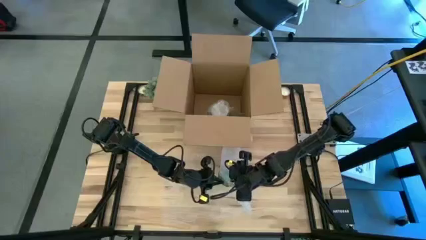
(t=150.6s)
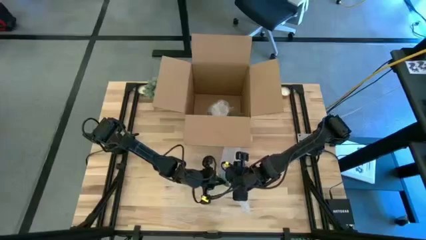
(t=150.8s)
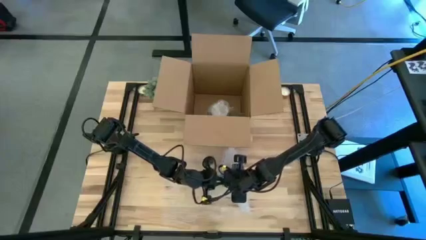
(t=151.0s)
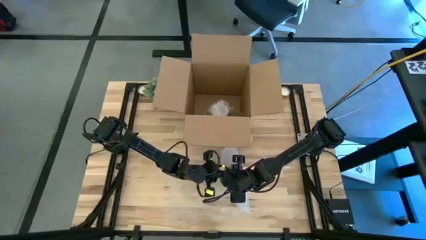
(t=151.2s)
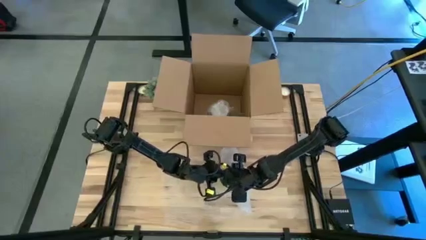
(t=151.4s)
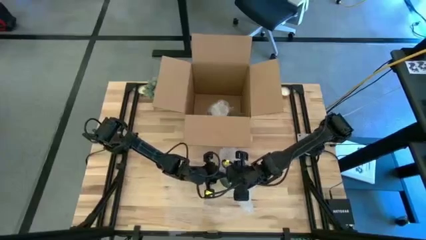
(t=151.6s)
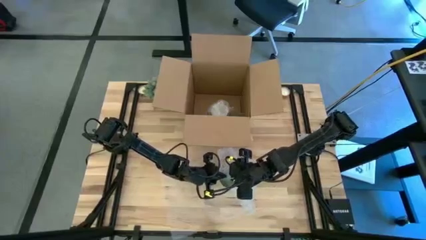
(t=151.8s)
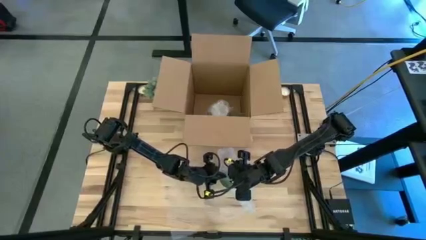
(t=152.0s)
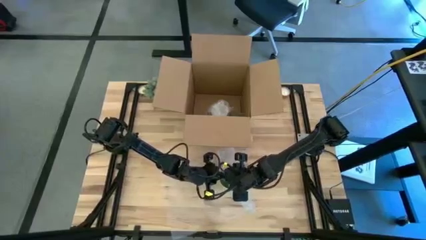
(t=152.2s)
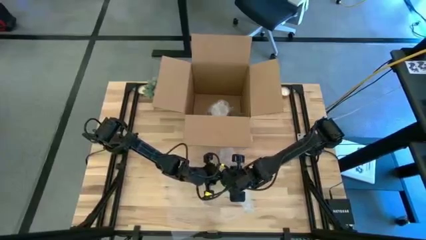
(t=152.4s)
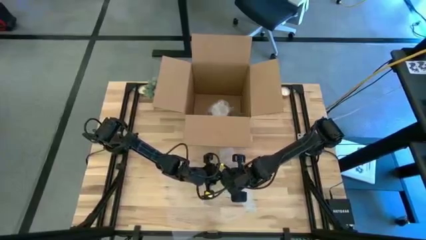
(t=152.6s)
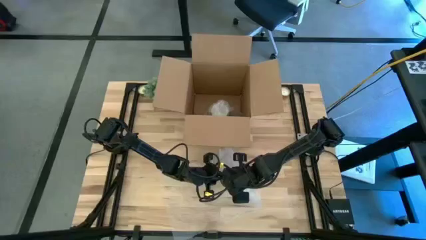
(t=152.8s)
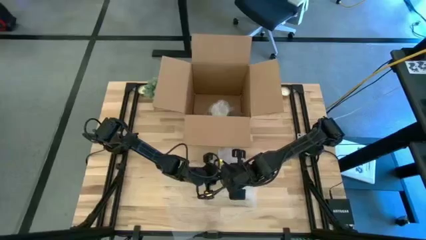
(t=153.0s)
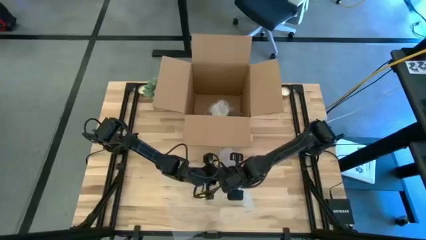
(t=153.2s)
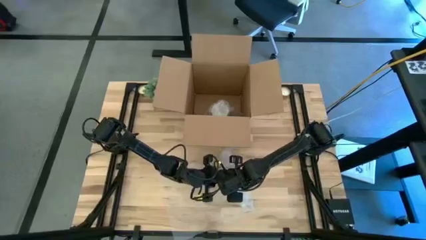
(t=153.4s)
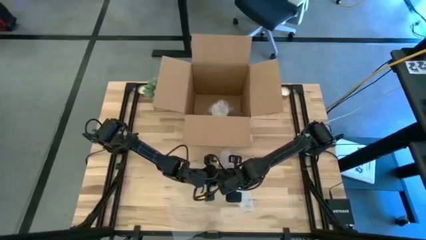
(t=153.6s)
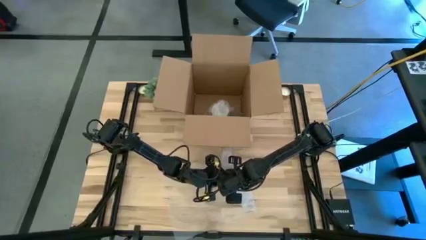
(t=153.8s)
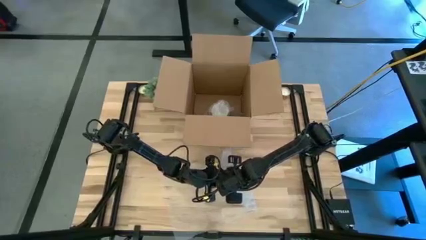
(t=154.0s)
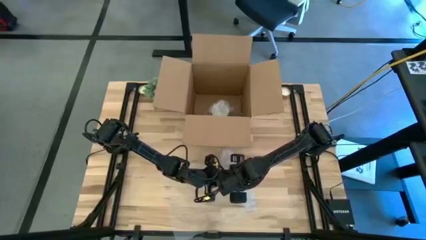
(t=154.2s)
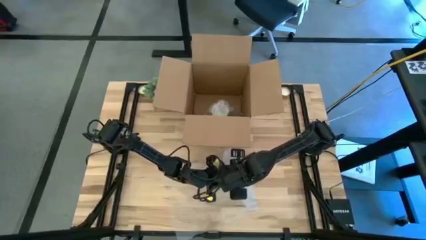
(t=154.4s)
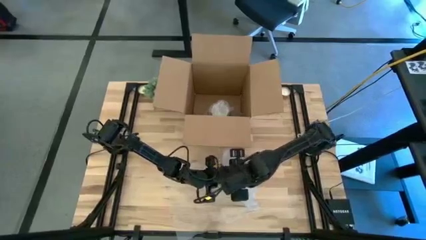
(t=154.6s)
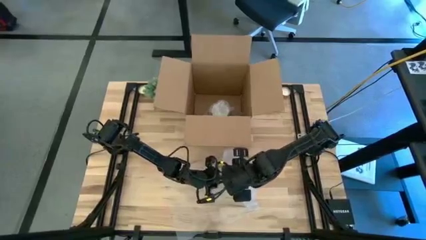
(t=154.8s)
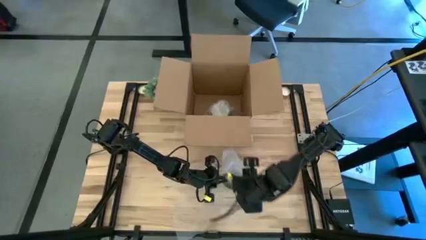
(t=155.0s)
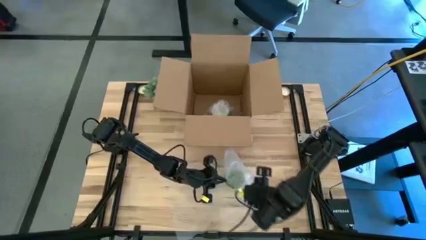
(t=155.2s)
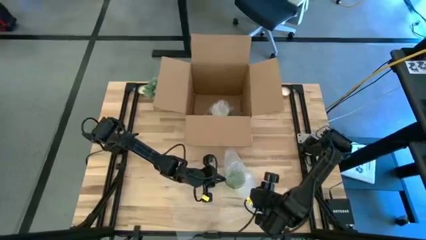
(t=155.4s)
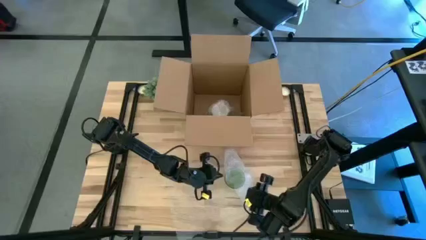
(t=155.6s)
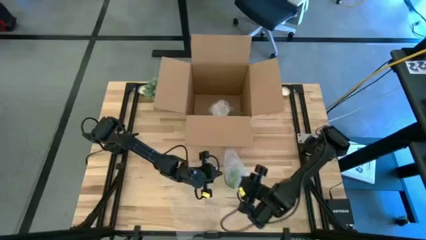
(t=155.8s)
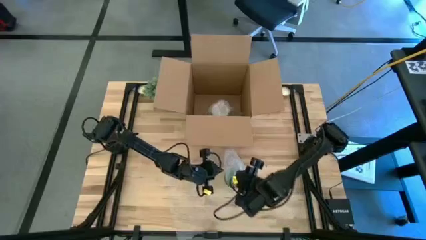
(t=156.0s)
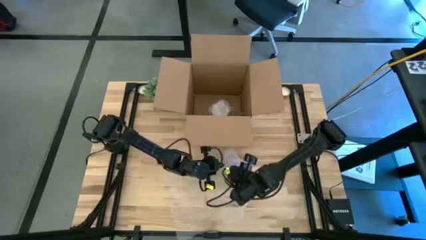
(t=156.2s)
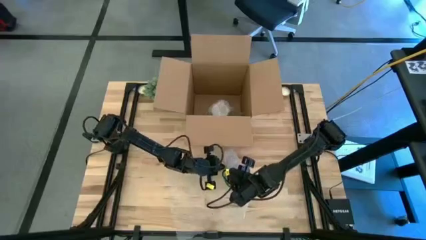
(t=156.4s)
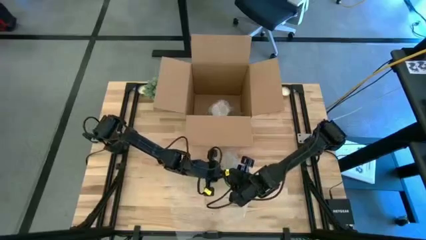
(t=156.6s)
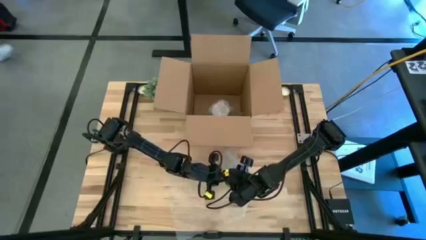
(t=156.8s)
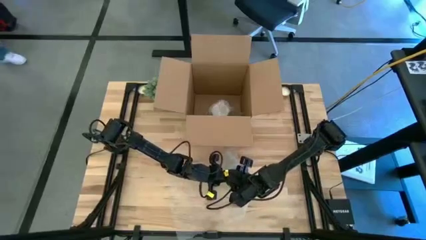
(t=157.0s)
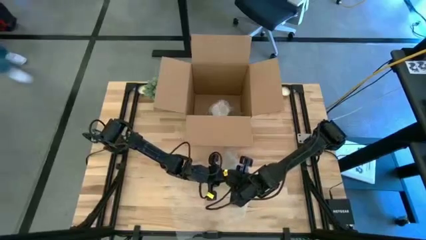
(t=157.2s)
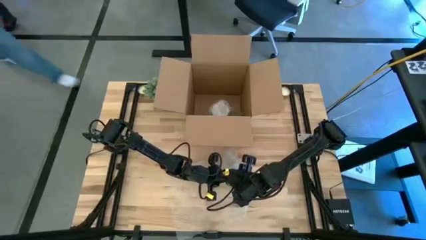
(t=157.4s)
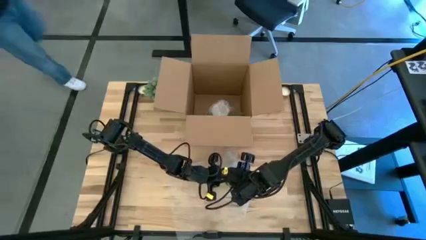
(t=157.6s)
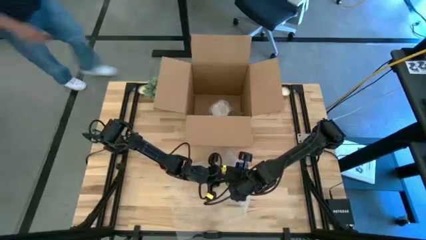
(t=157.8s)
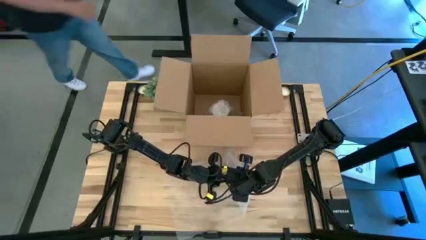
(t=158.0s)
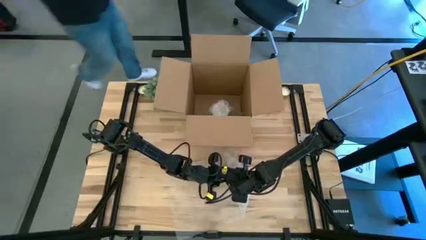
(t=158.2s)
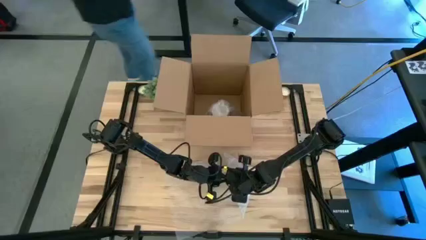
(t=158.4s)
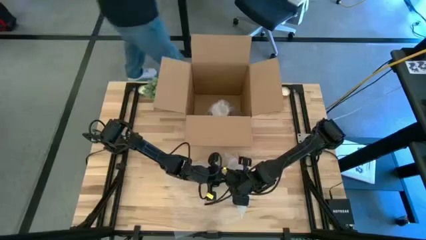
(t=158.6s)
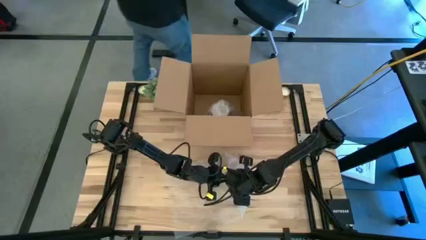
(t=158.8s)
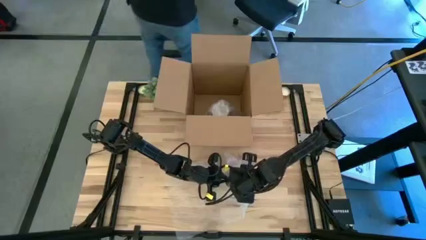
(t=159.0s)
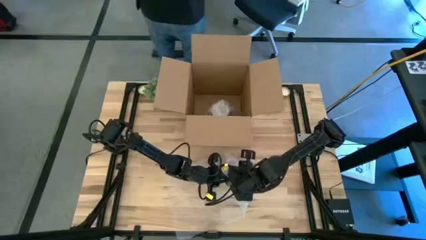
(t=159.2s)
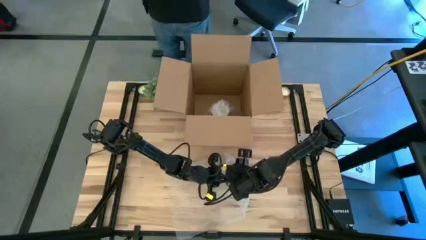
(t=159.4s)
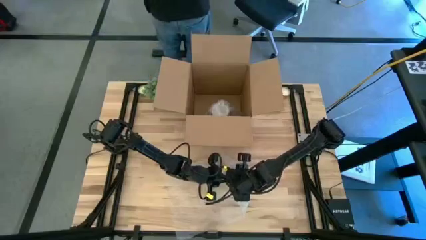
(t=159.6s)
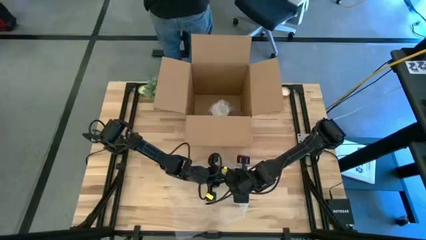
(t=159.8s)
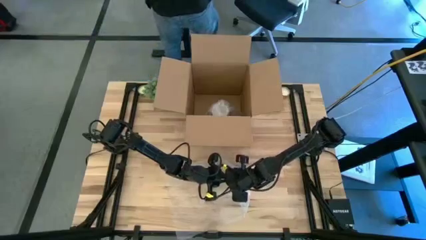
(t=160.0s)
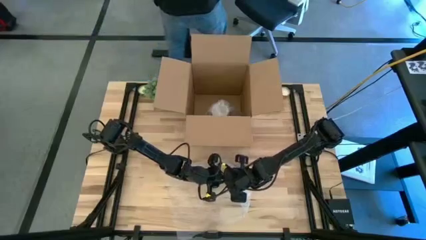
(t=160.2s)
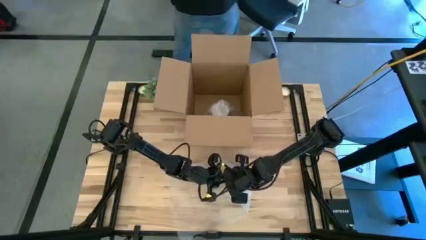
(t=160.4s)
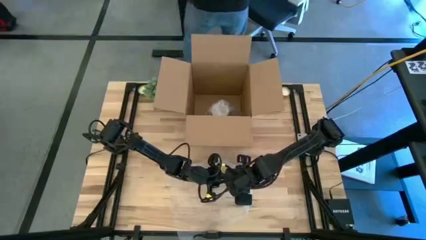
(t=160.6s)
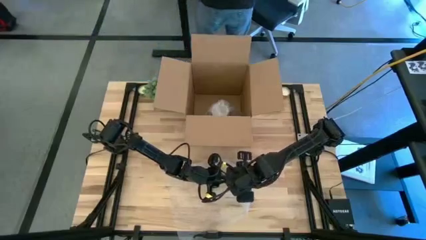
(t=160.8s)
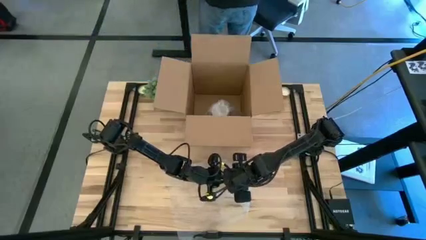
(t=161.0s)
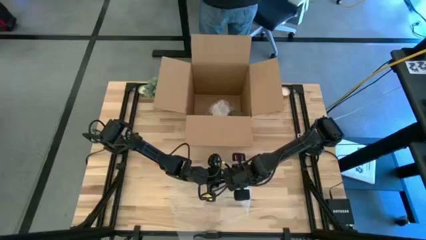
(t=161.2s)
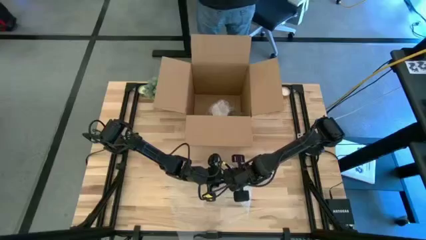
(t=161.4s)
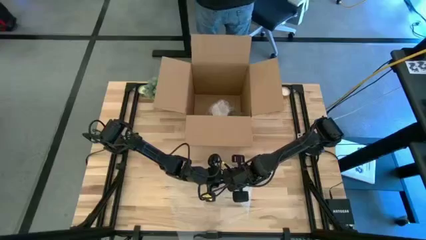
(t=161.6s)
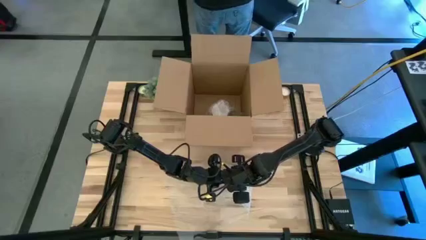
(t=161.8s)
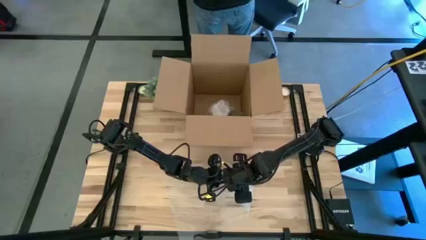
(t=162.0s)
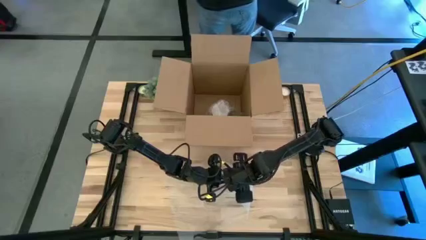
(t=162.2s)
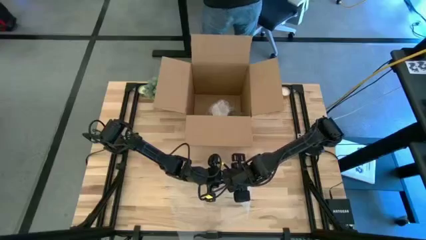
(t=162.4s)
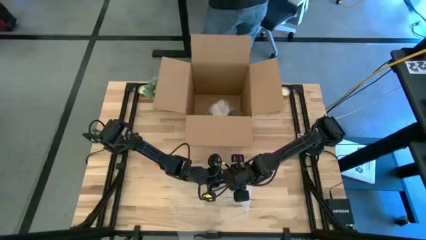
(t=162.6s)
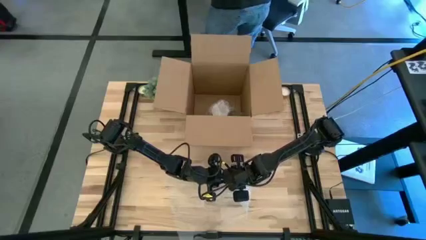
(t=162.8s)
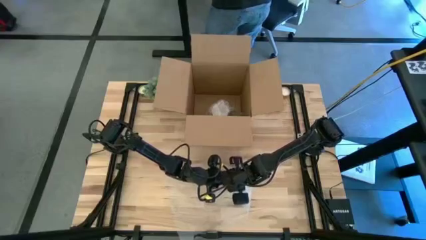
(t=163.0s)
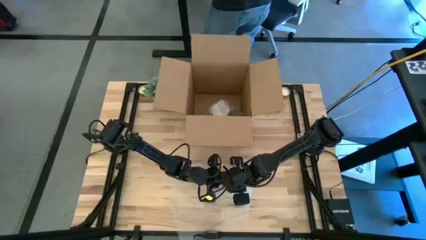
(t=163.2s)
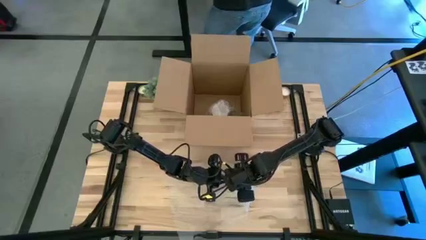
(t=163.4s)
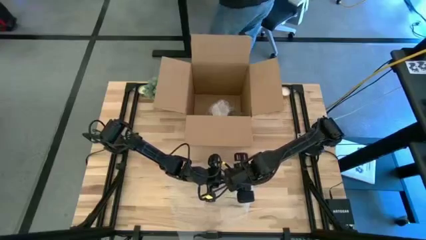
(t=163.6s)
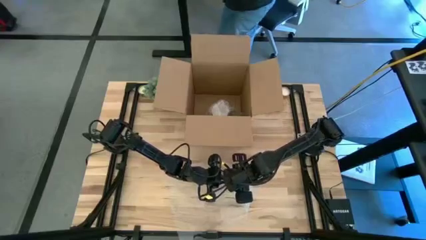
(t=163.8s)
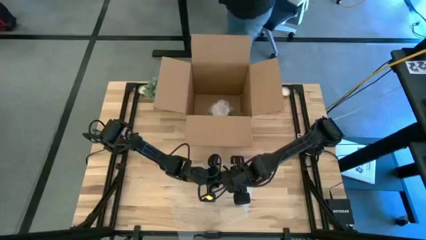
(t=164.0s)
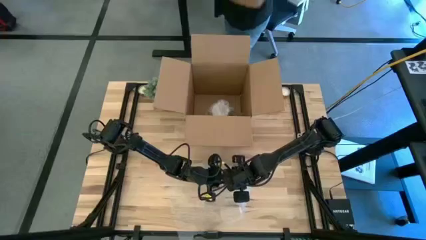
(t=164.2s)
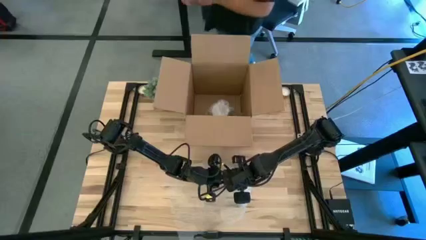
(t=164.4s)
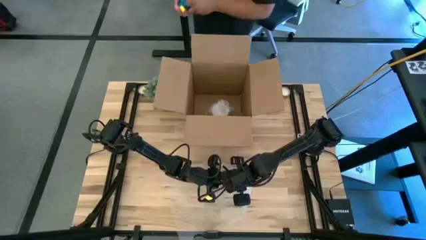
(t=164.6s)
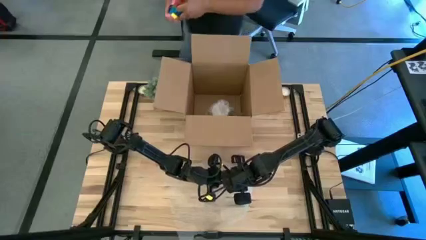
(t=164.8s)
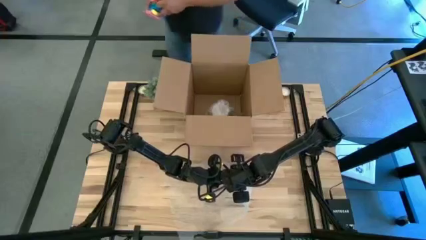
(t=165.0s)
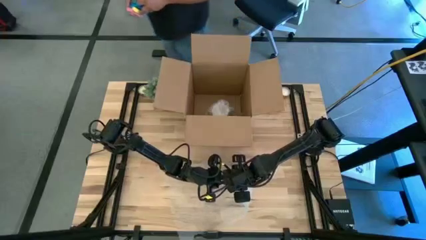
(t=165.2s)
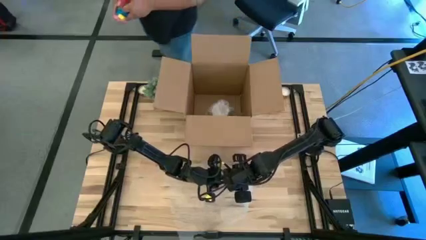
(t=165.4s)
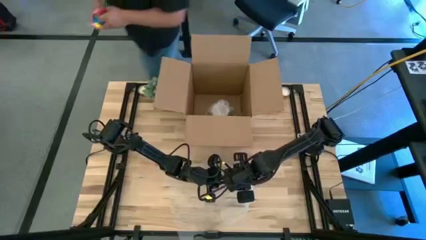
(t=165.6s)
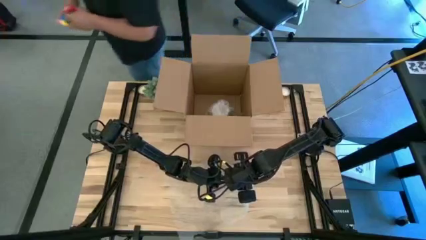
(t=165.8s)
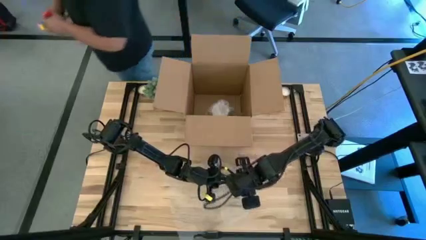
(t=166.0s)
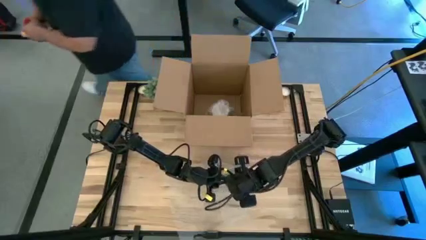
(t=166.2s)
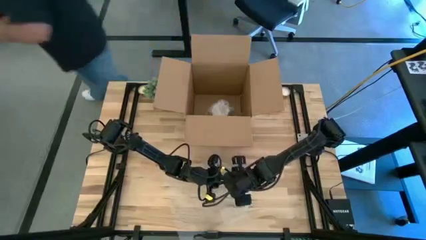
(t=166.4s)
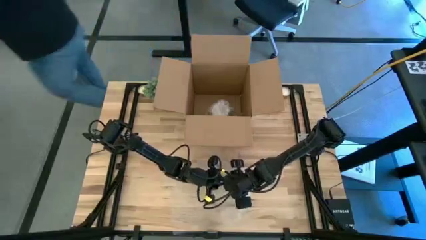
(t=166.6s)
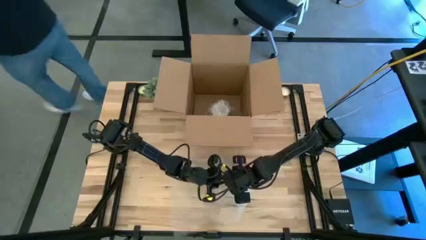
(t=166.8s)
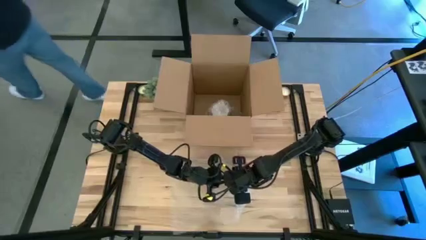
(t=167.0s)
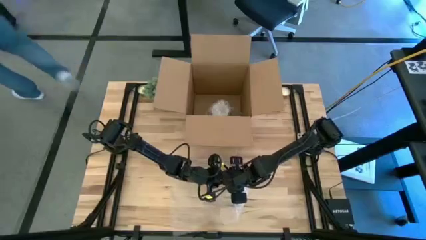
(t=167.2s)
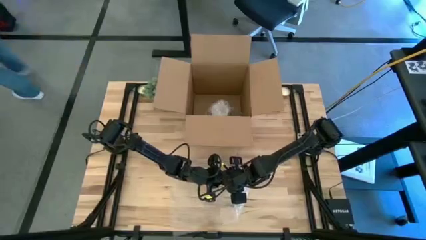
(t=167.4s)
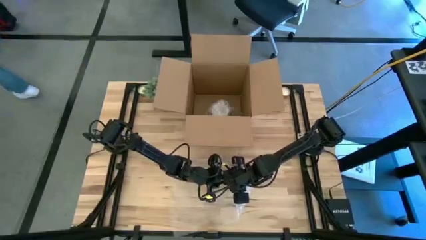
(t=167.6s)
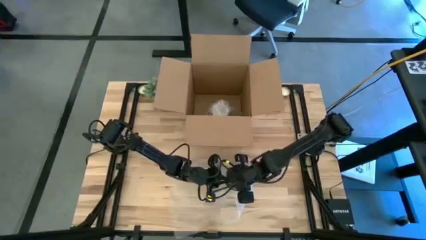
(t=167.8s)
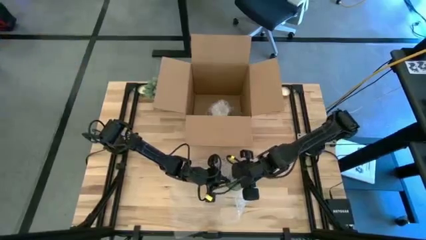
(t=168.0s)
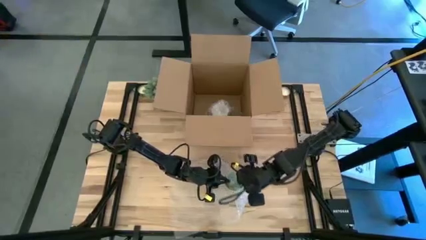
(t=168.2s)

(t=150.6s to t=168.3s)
Task: wrap mug
Wrap the green mug with bubble wrap
